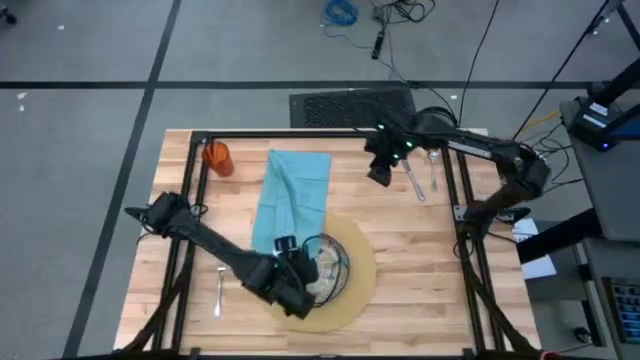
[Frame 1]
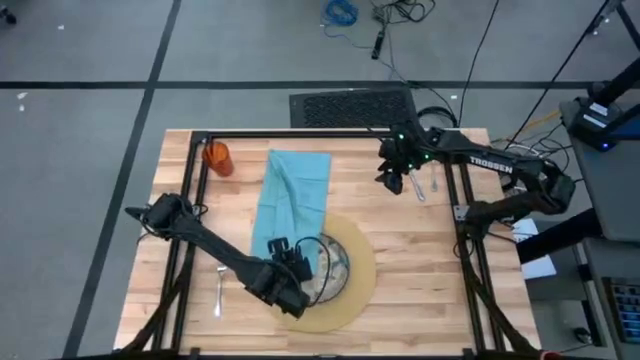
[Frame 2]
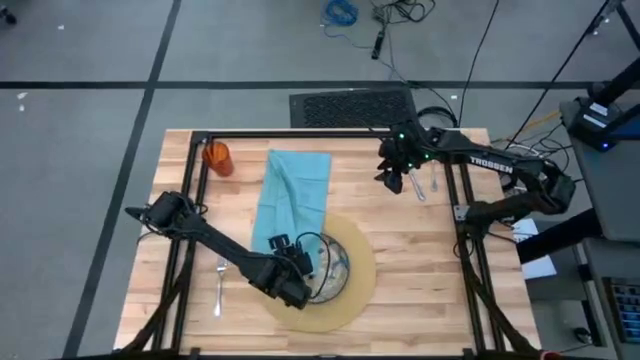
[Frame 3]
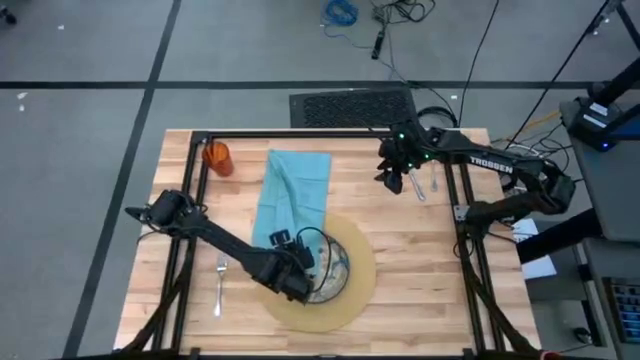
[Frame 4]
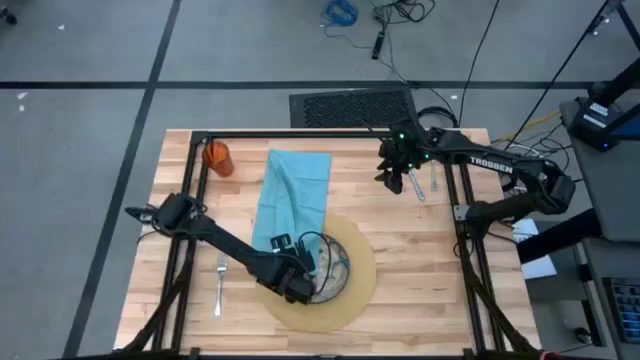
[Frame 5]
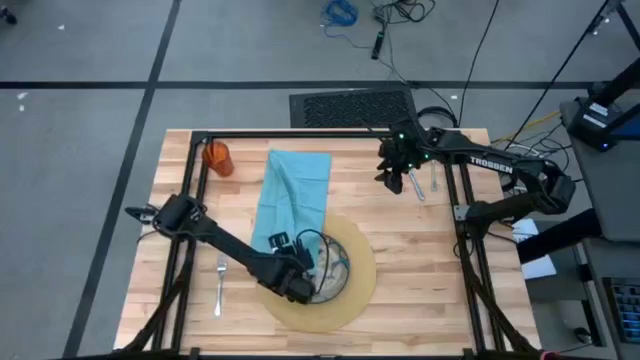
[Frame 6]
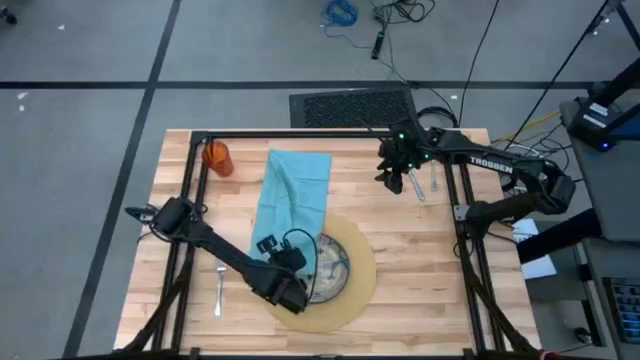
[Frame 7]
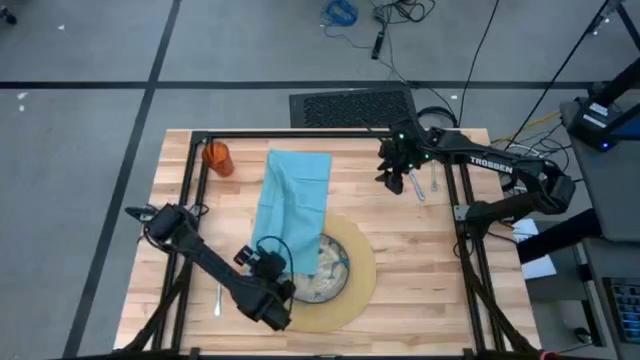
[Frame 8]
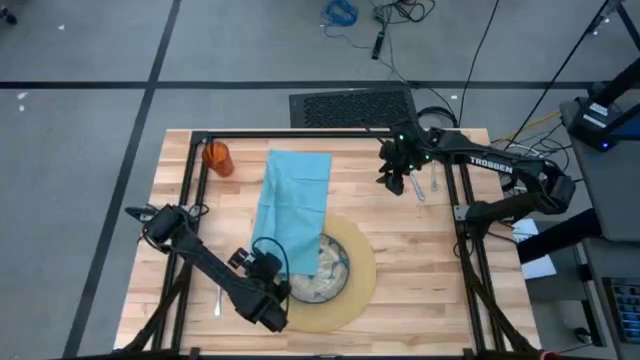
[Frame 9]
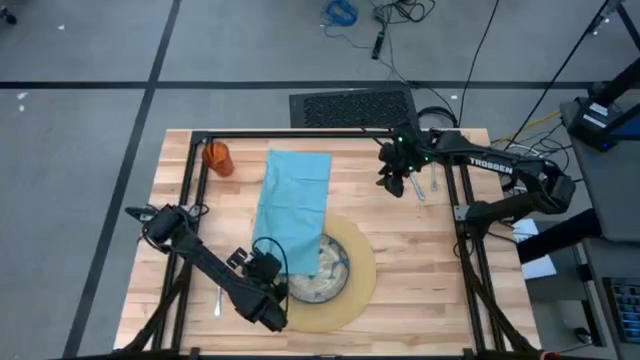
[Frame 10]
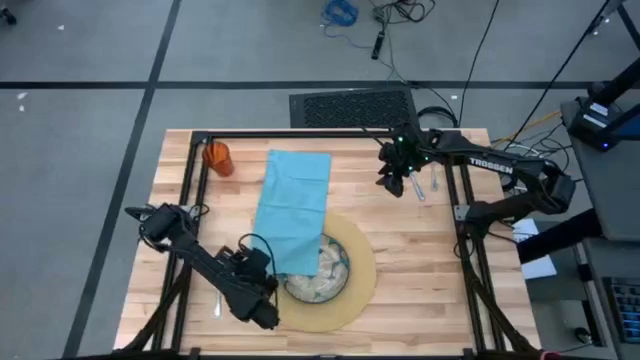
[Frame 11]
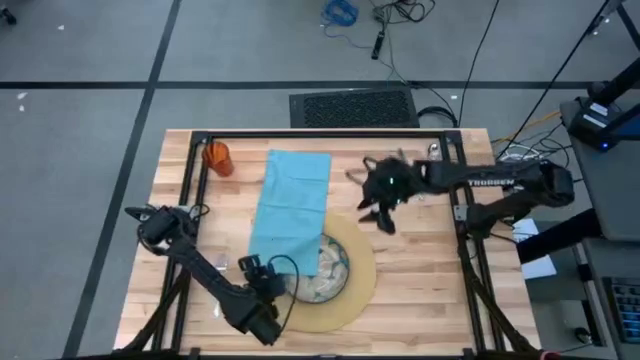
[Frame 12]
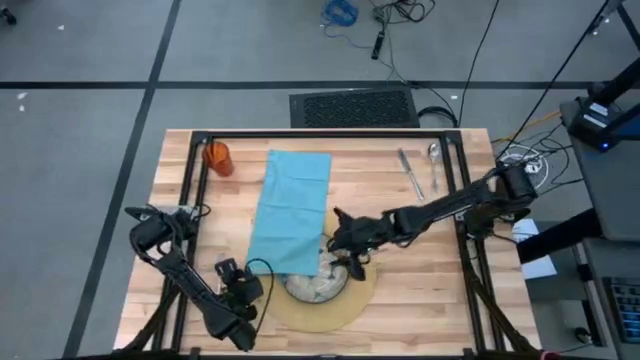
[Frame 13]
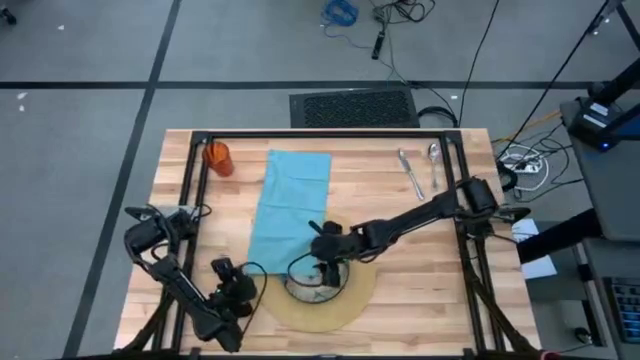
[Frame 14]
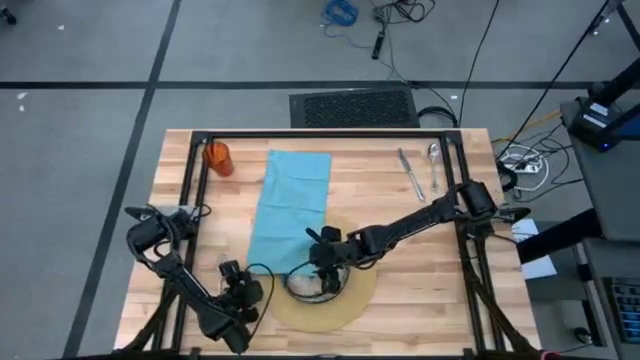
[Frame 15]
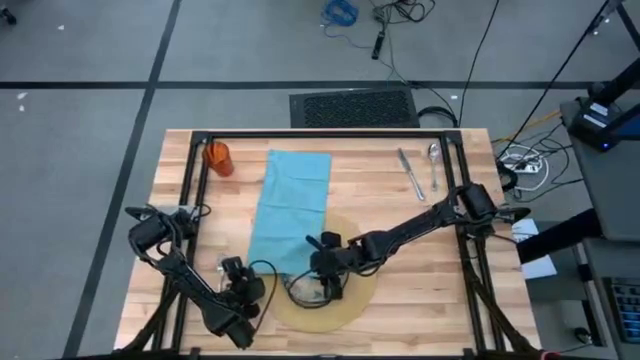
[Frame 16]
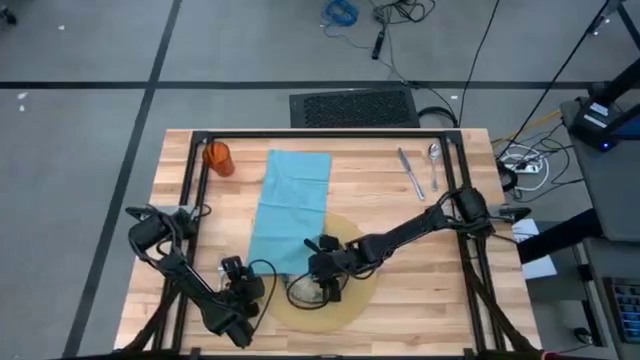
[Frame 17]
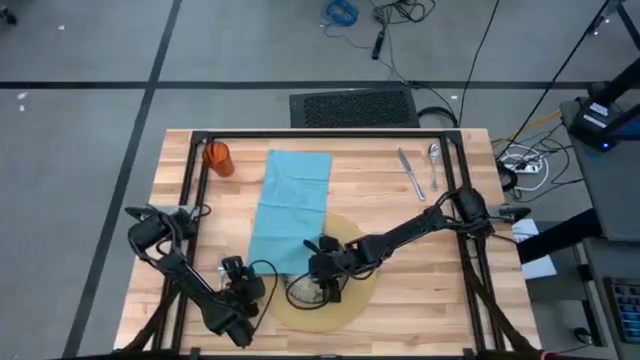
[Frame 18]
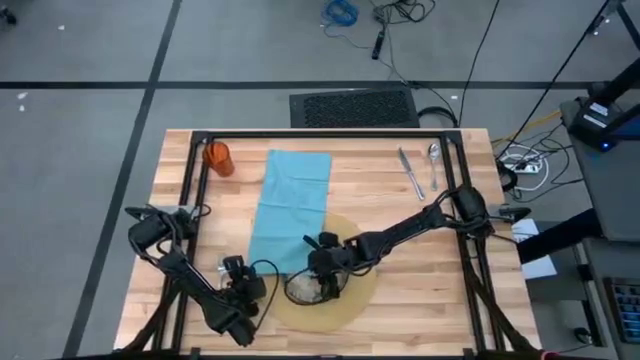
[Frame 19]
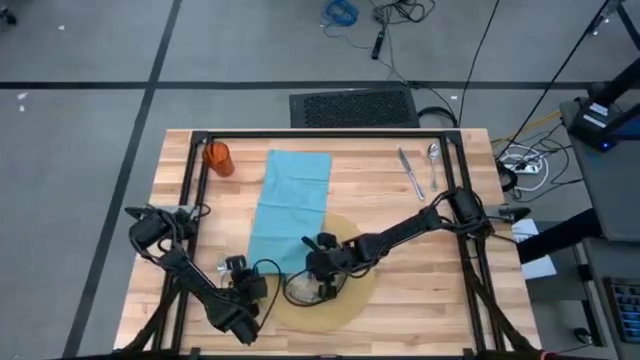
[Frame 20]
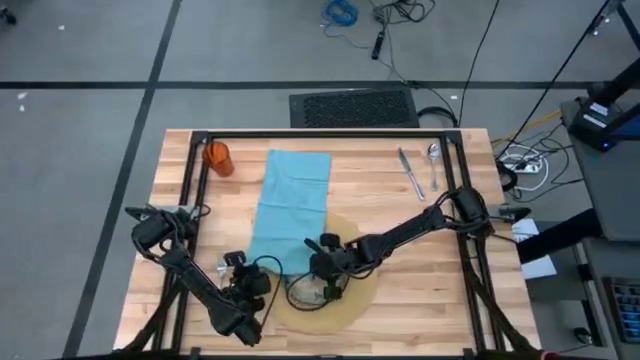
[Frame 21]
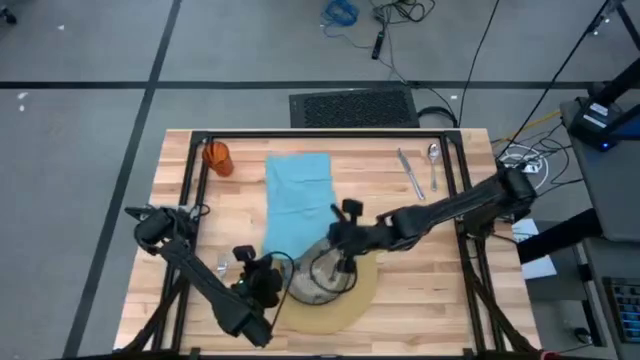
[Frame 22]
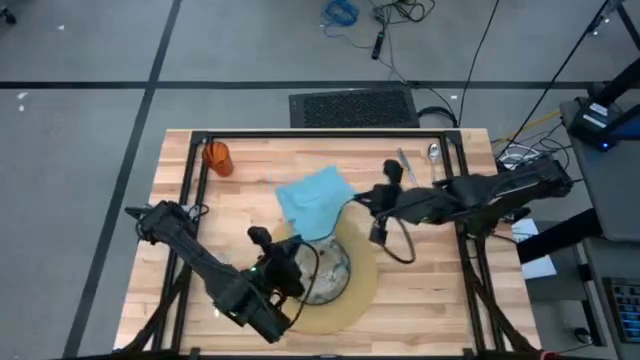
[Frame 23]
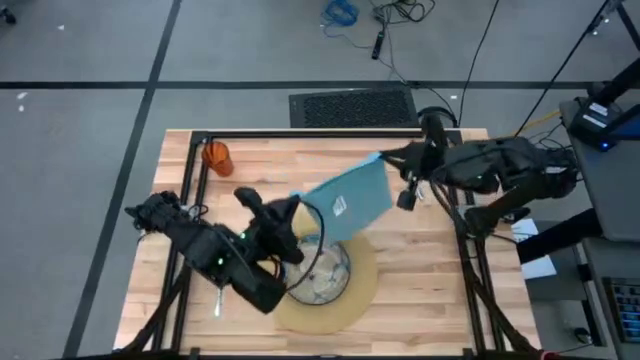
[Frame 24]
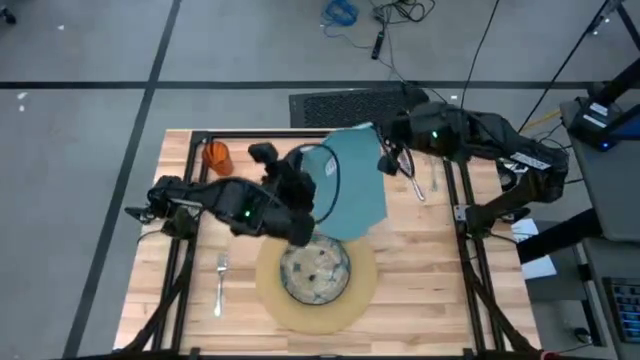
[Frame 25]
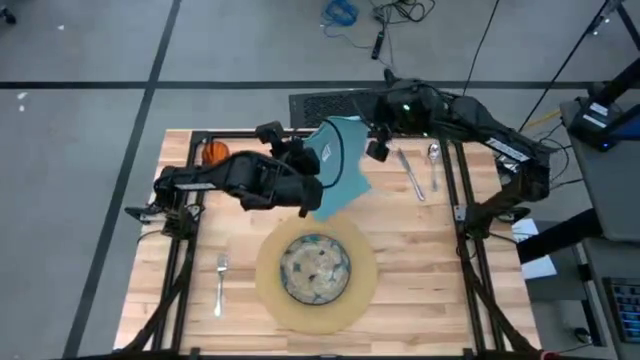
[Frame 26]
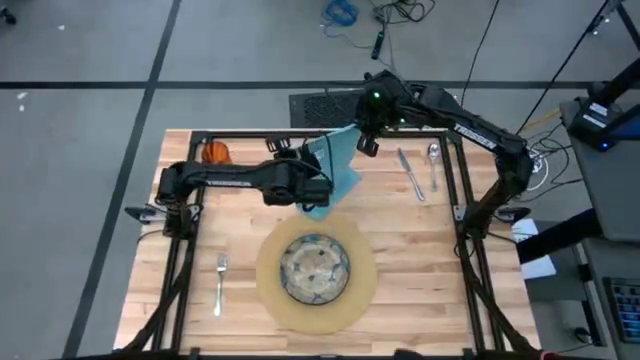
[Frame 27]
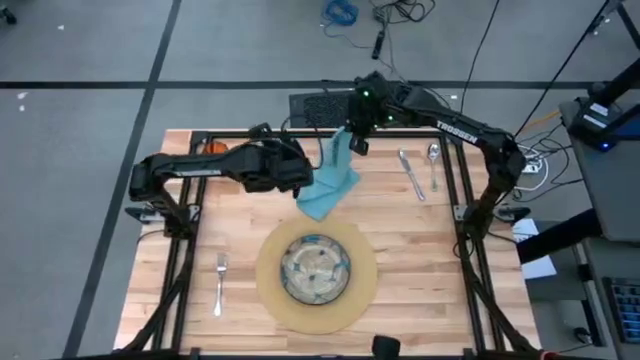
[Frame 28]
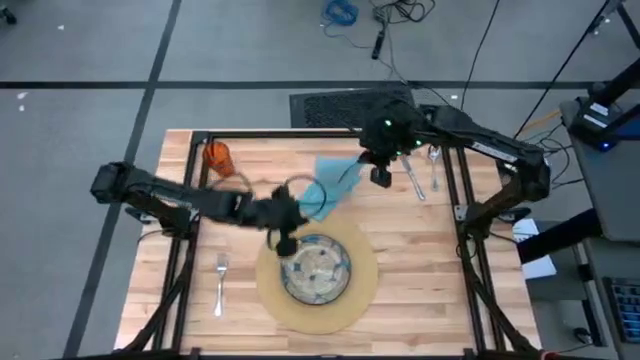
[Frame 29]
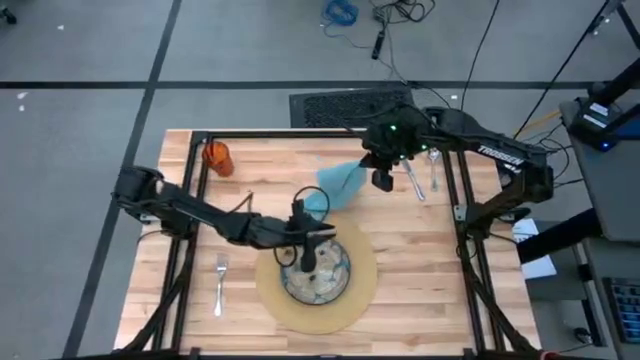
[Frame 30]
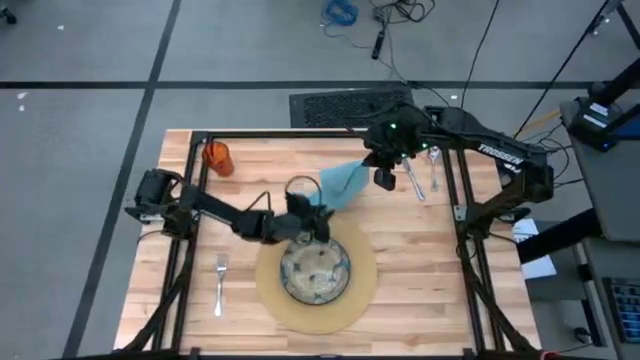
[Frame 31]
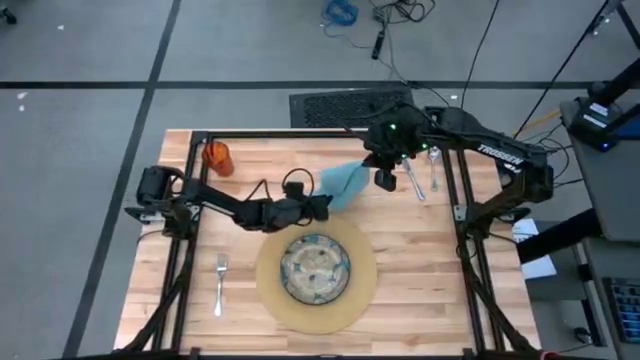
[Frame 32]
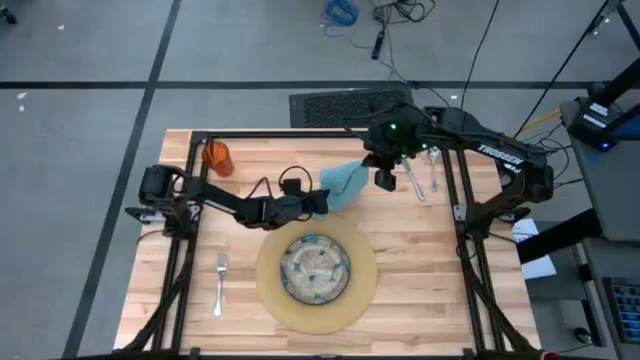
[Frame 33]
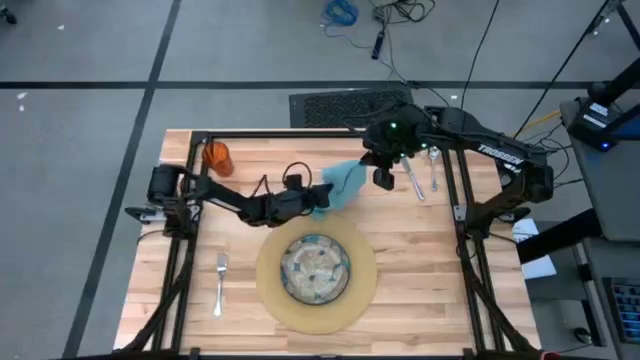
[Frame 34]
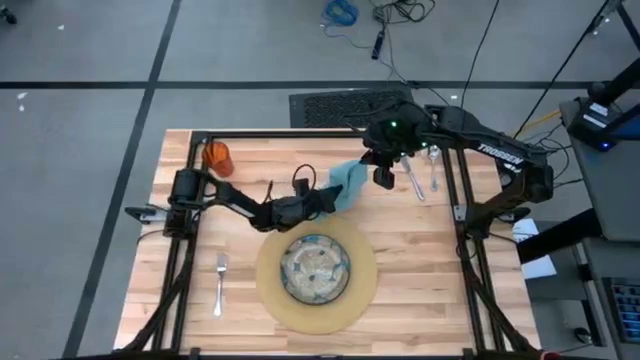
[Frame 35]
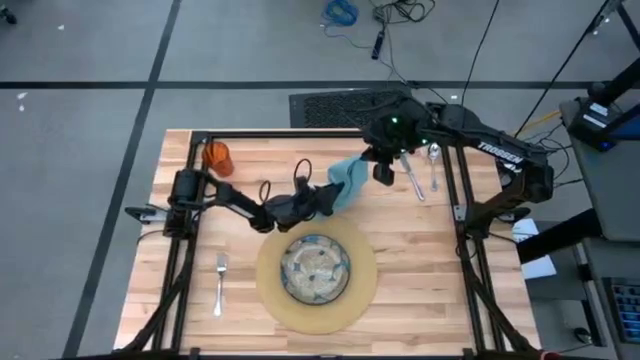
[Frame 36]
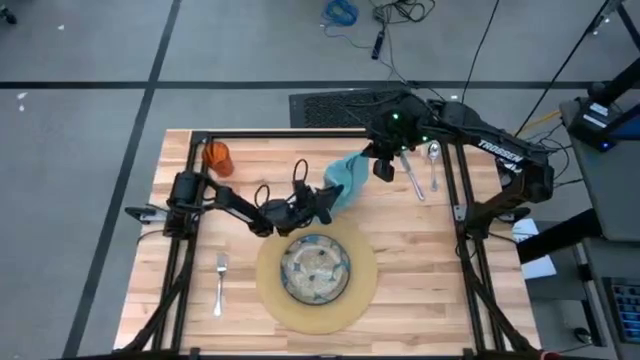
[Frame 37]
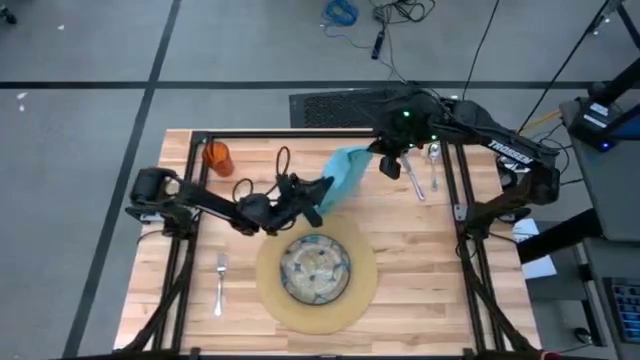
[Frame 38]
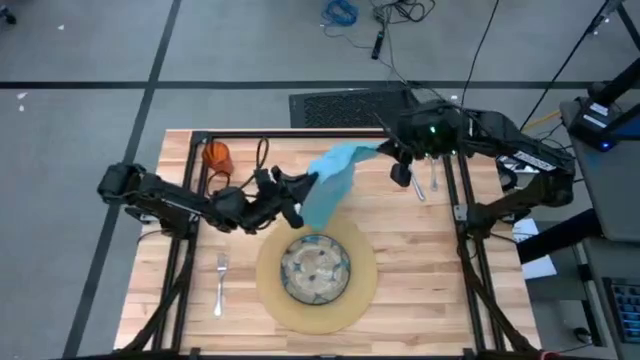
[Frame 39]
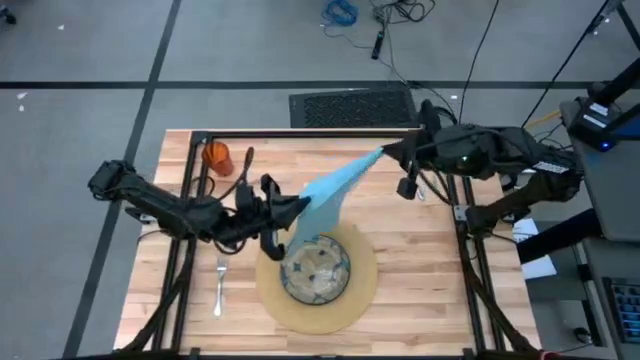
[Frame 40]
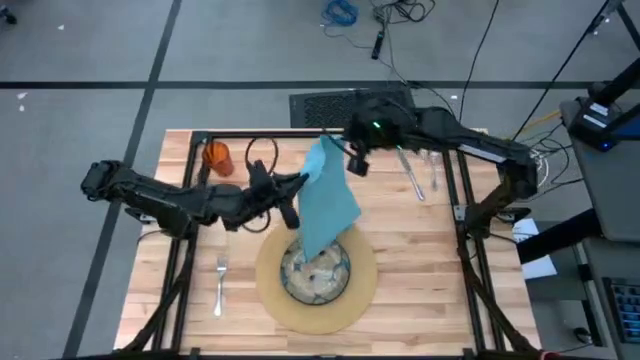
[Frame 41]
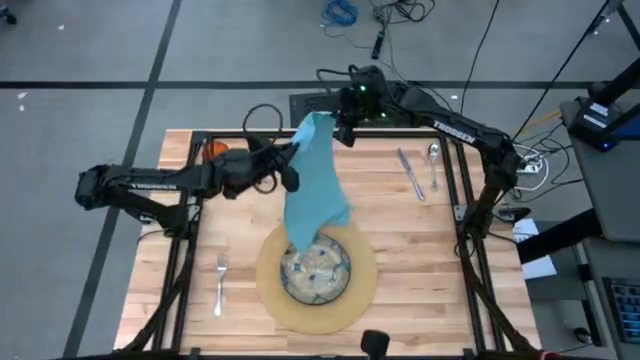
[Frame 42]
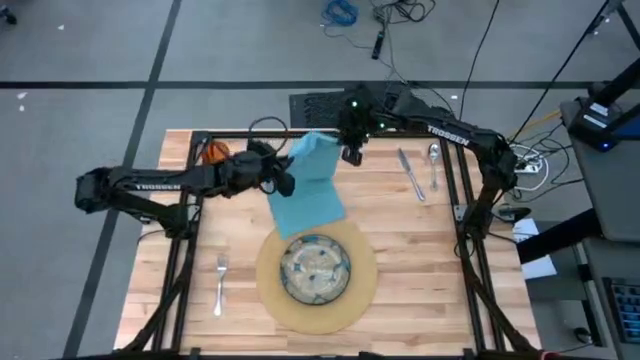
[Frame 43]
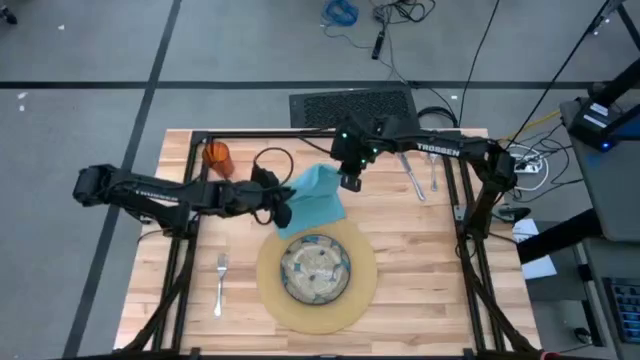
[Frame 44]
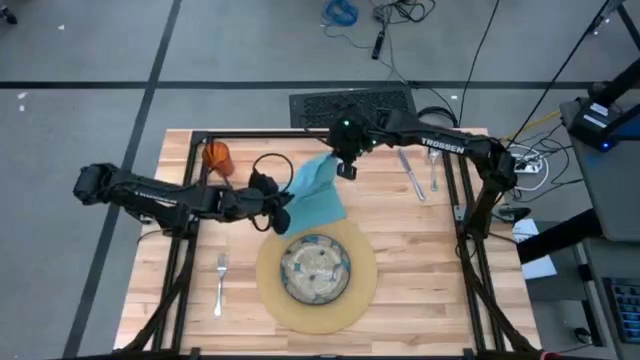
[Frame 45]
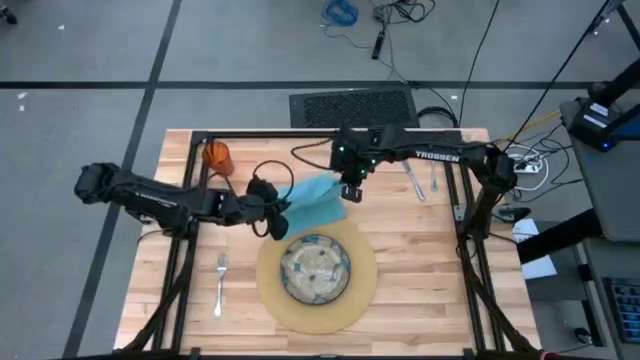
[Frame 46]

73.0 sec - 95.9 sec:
Task: Set table place
Fold the blue napkin
